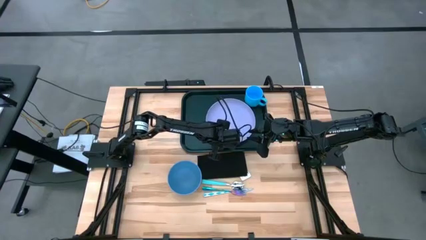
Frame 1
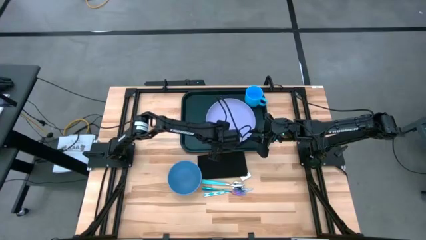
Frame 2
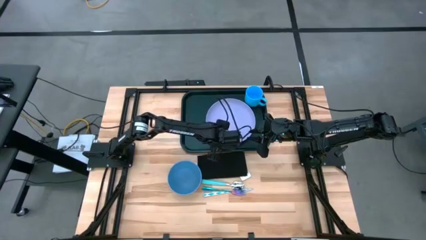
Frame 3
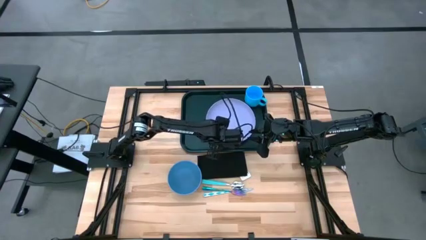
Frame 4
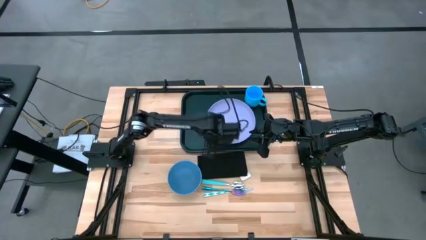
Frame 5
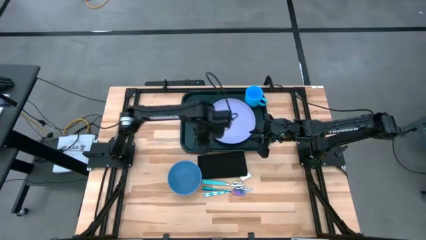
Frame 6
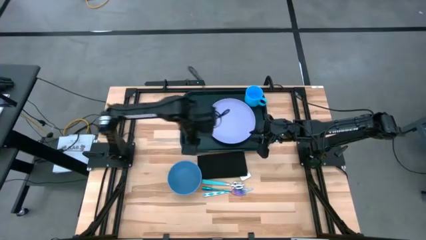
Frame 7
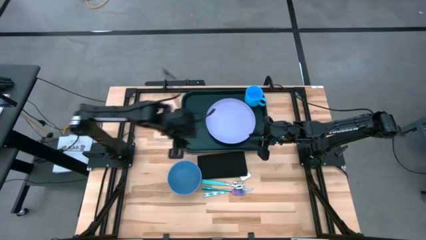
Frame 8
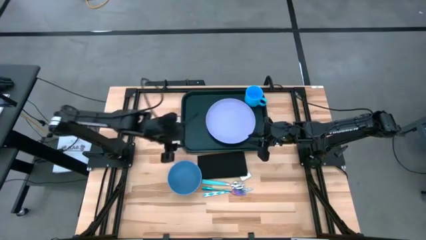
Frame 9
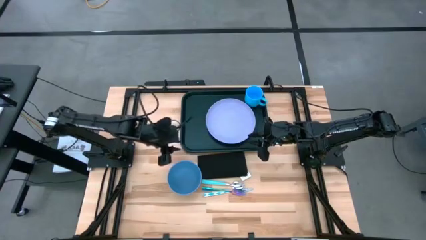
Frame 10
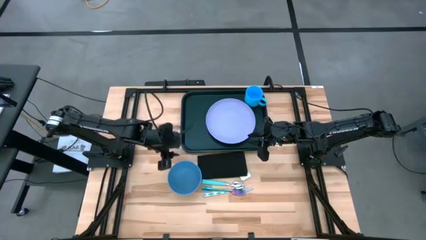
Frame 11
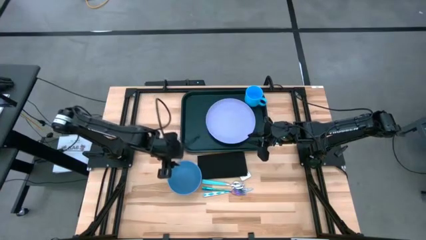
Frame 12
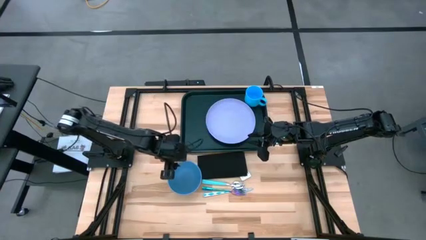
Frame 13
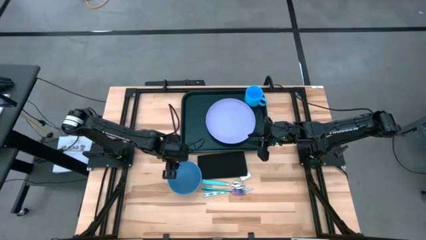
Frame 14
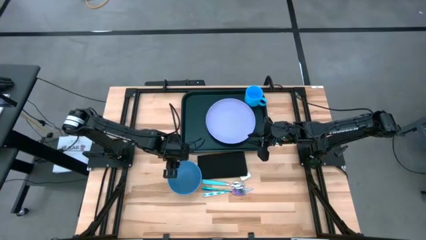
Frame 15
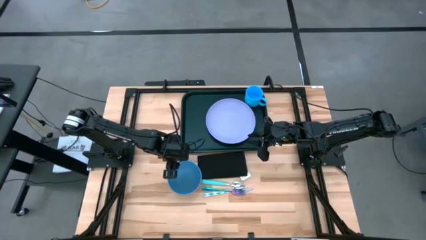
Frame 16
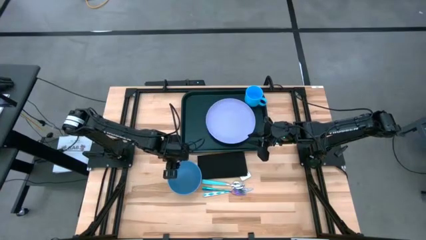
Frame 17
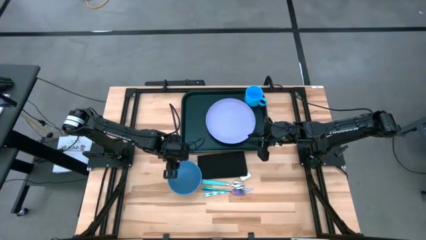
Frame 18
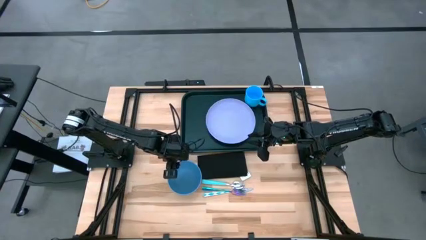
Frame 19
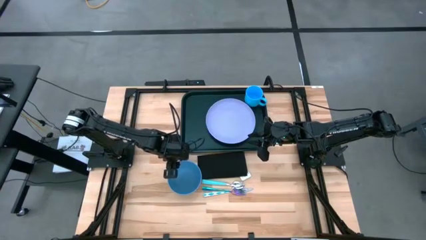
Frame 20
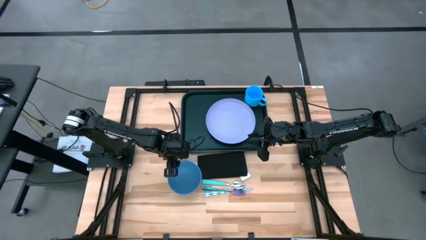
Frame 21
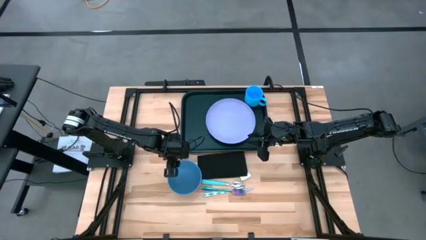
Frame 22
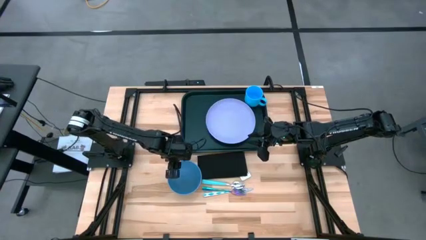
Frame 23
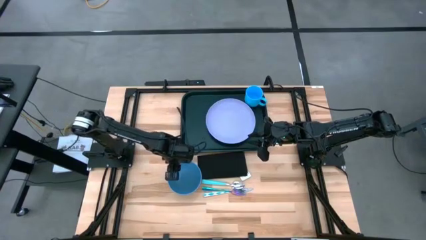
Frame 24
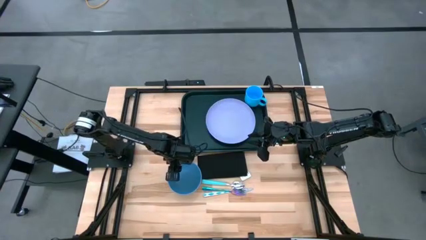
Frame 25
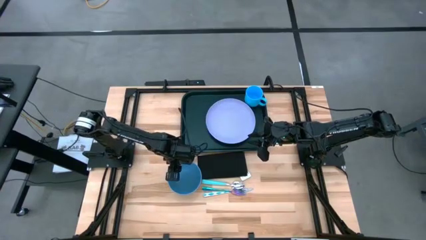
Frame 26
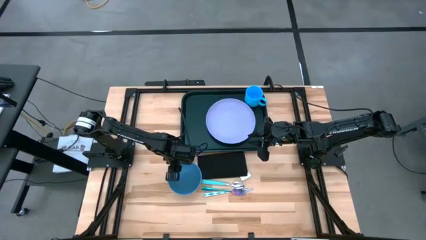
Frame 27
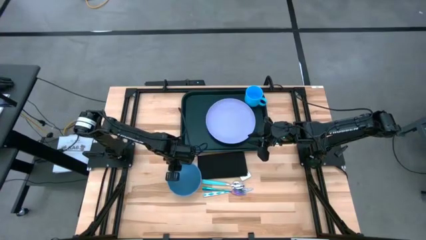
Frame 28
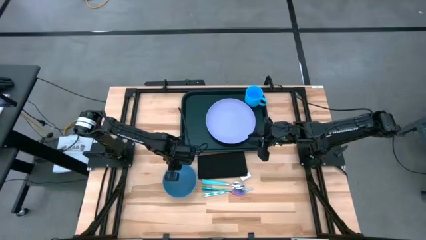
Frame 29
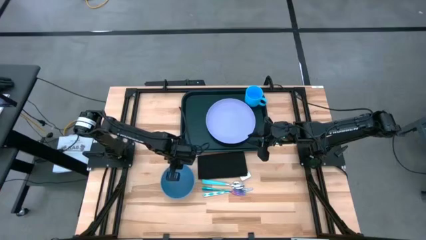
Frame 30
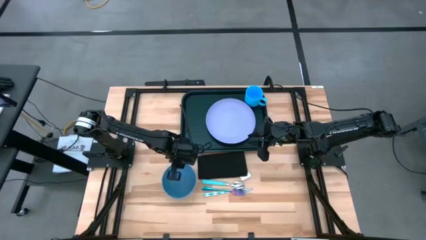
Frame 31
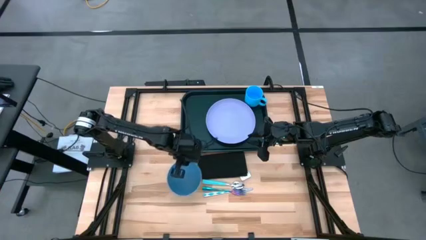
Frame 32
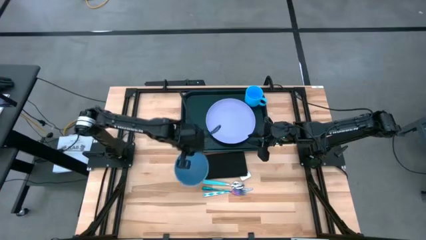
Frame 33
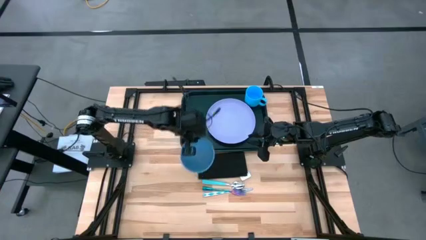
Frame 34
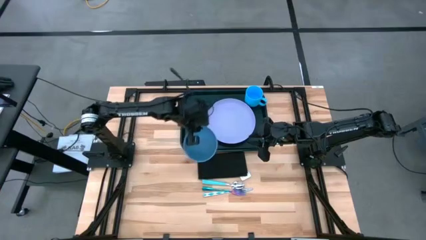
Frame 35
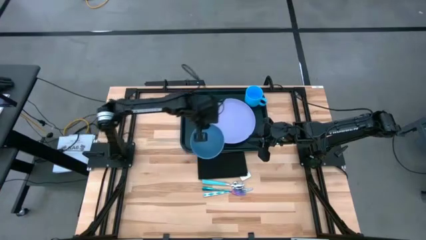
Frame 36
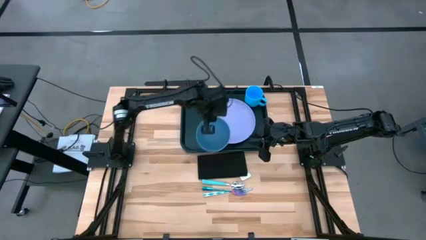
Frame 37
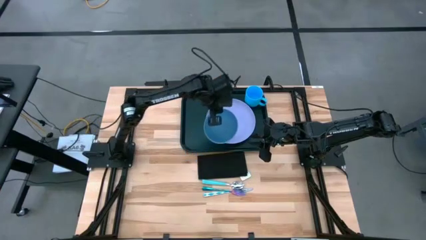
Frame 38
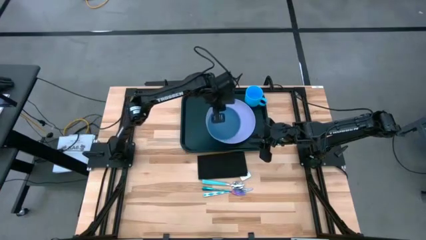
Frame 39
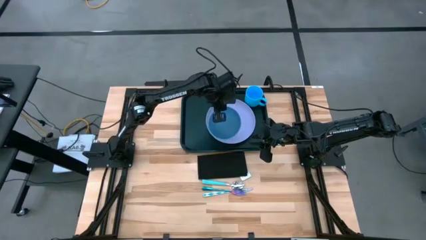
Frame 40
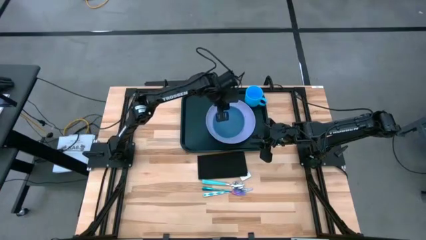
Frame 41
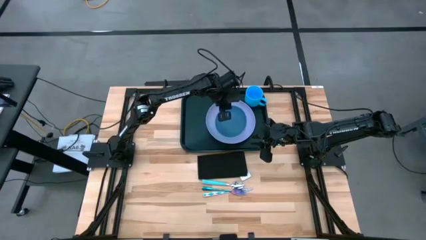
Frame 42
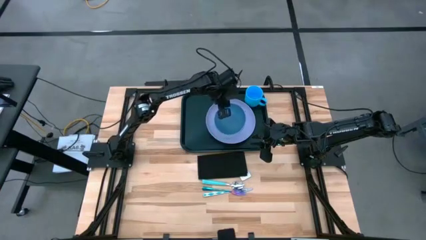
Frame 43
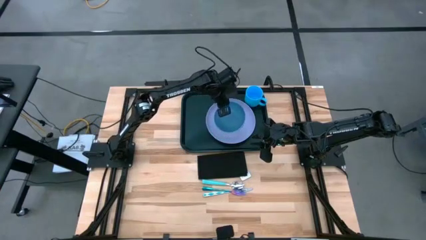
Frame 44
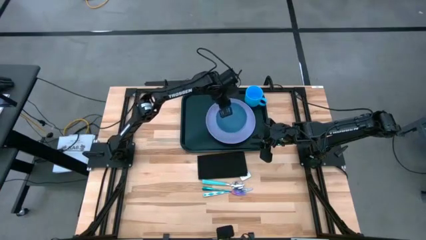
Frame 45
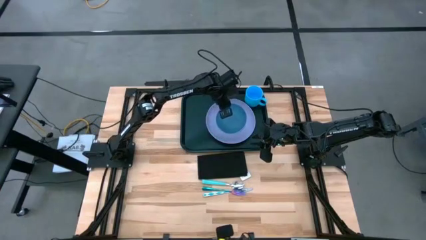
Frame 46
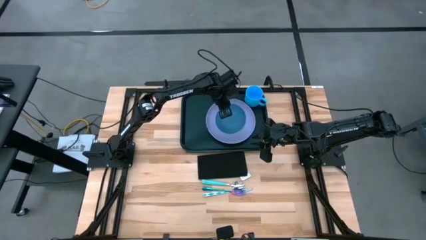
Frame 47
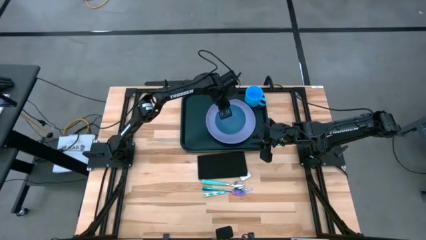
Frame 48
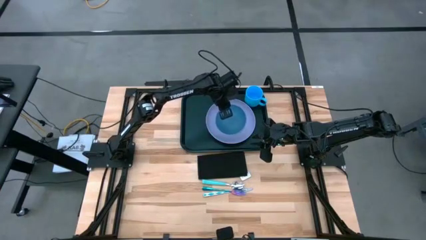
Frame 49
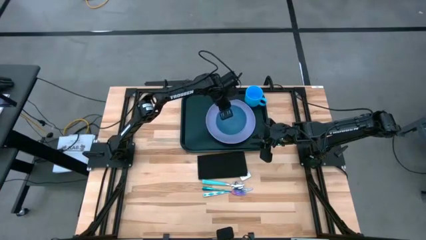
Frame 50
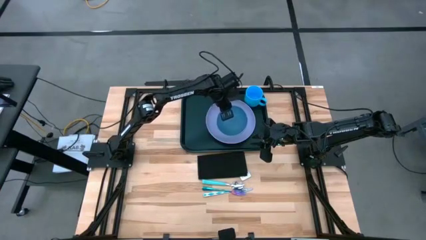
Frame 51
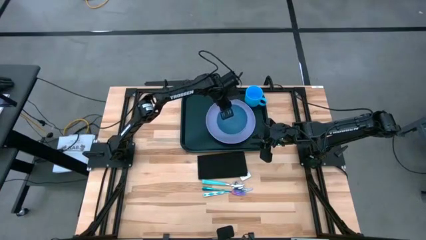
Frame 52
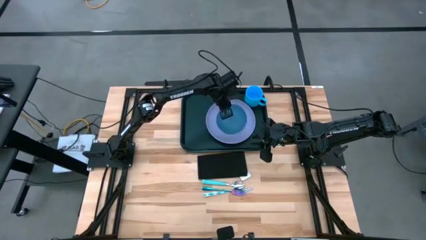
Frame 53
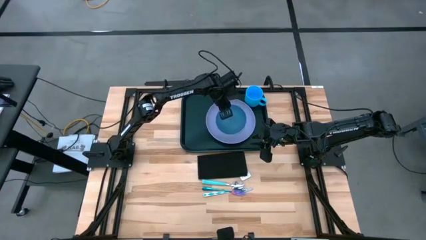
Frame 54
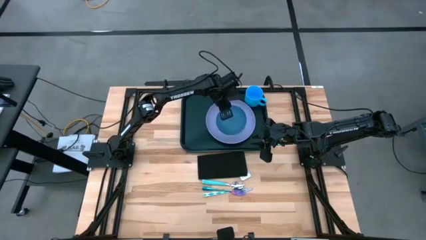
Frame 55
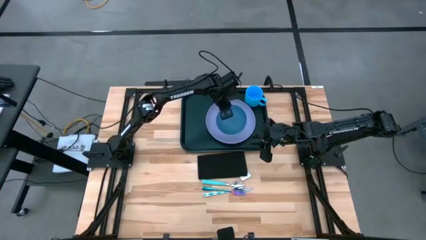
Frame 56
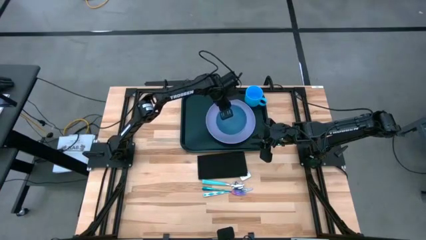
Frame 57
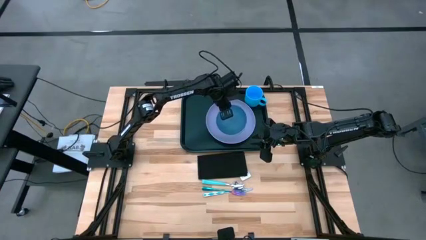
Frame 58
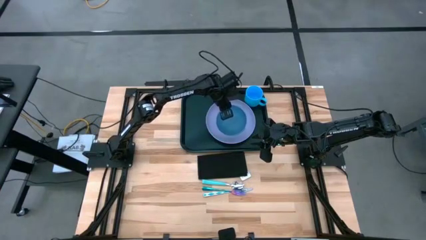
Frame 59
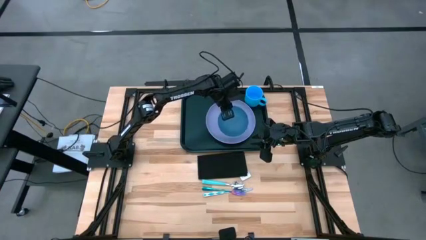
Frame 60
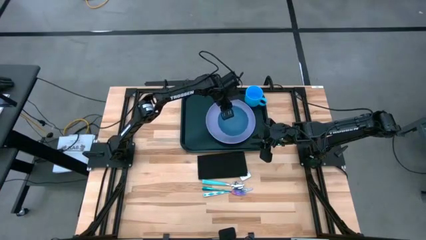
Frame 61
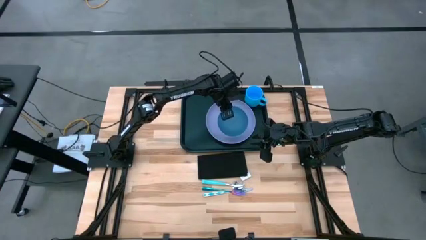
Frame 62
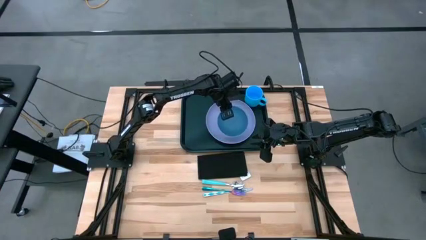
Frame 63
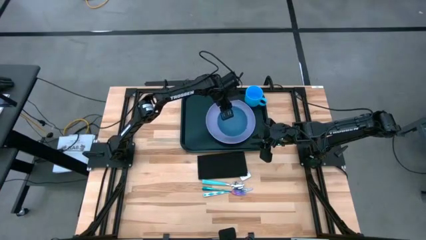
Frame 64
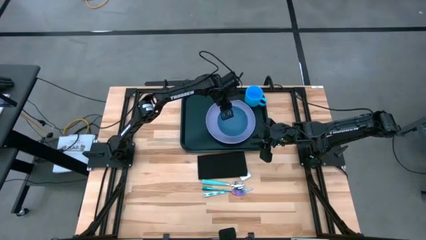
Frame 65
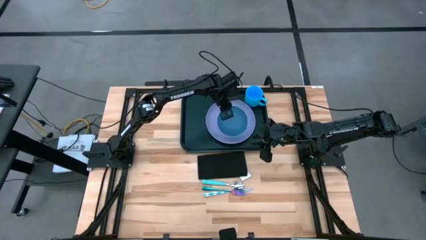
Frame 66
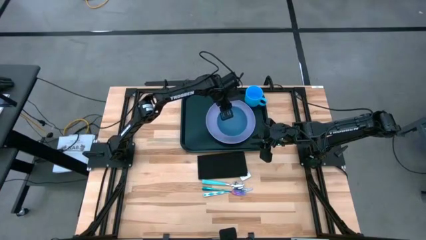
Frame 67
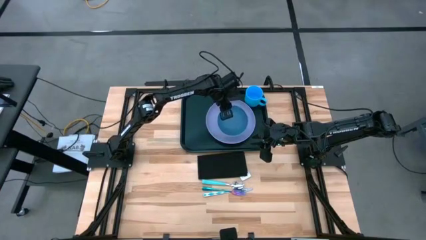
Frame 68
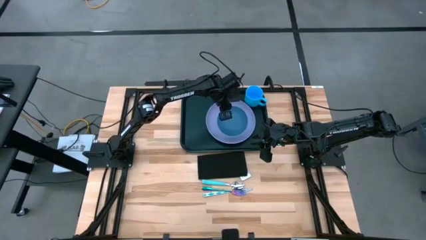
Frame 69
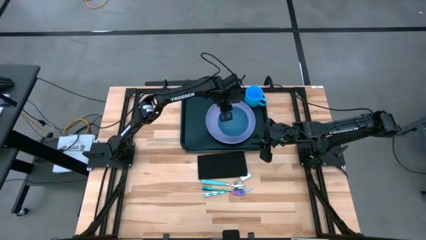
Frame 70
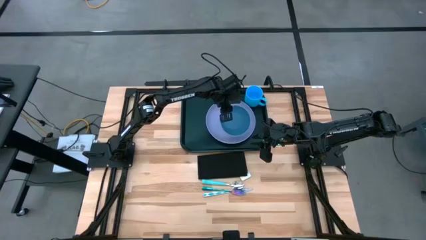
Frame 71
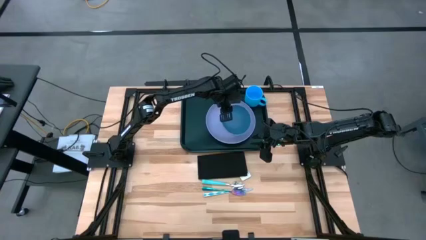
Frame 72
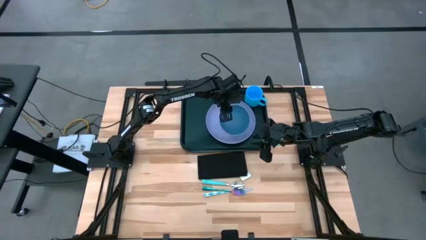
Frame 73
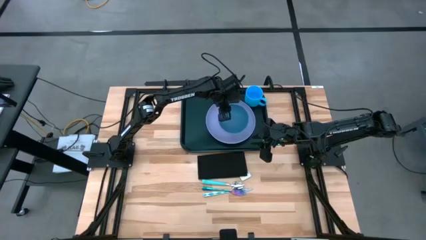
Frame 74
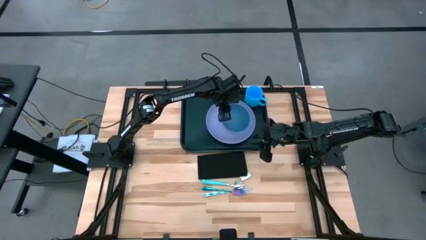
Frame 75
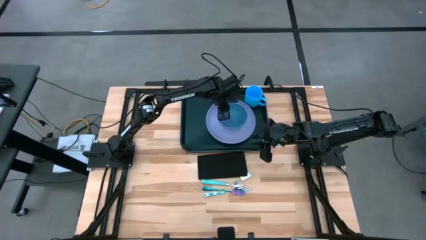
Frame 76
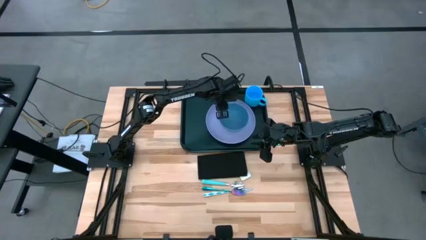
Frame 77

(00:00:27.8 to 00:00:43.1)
Task: Set up tray
Put the blue bowl on the violet plate on the black tray
